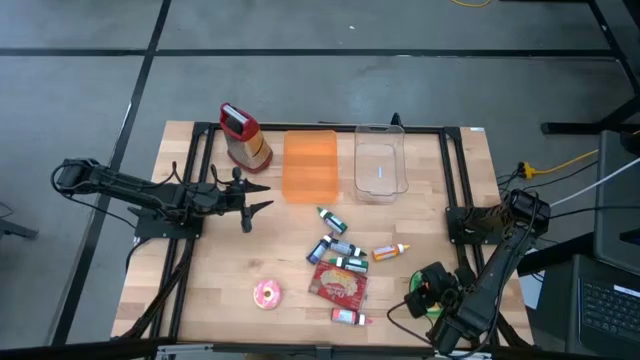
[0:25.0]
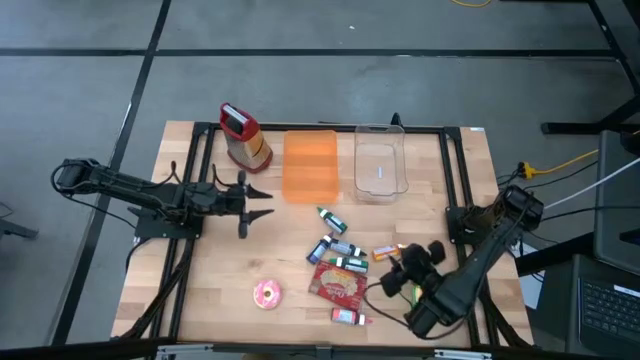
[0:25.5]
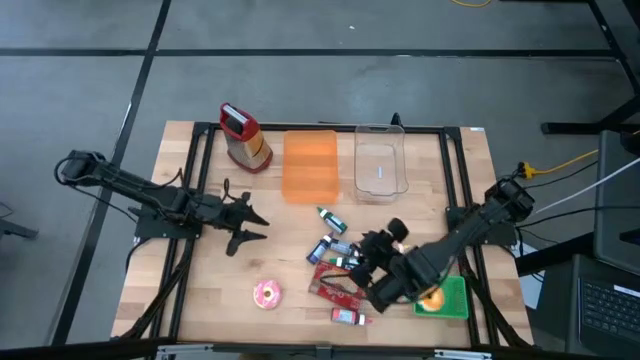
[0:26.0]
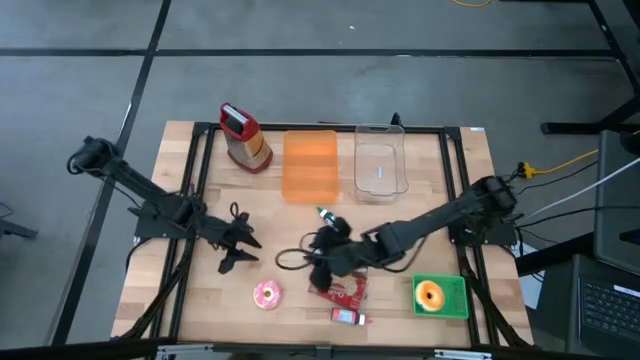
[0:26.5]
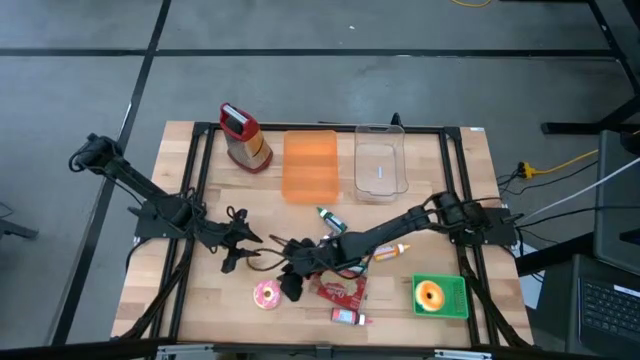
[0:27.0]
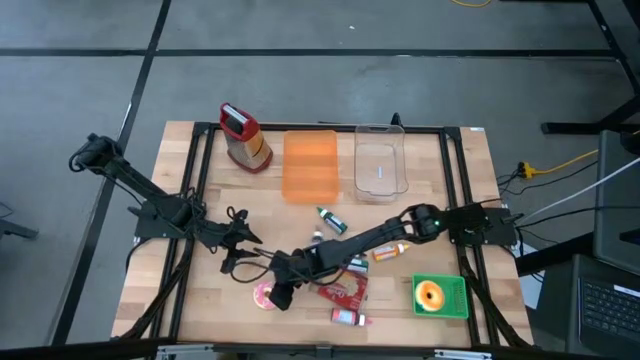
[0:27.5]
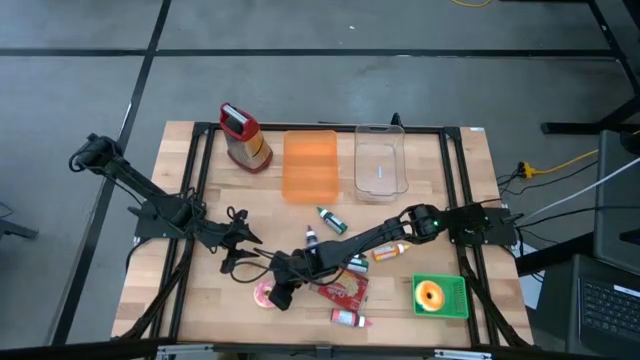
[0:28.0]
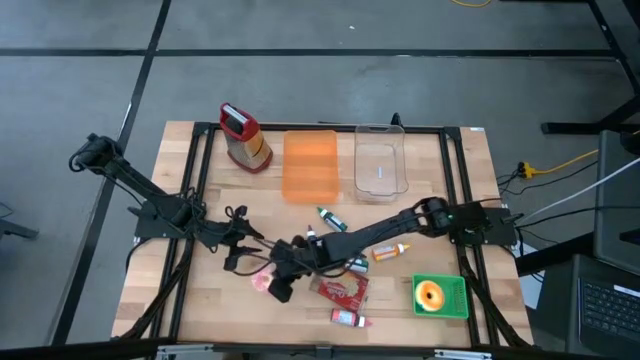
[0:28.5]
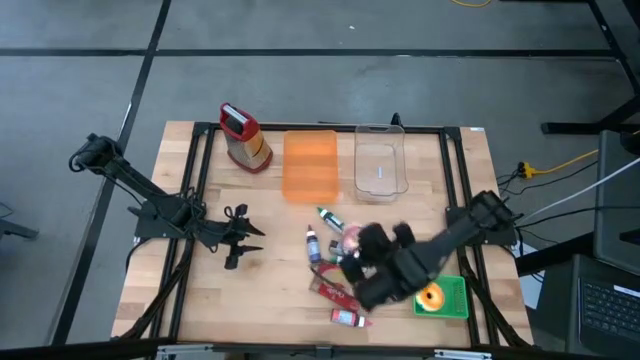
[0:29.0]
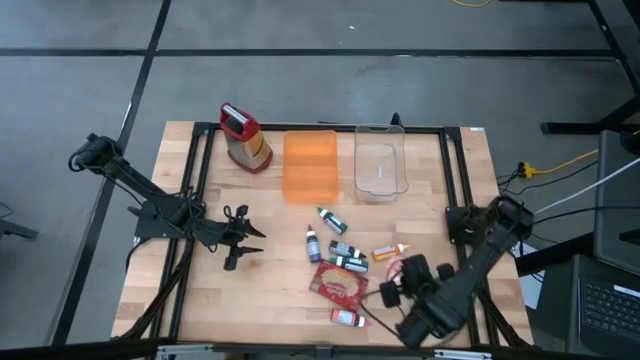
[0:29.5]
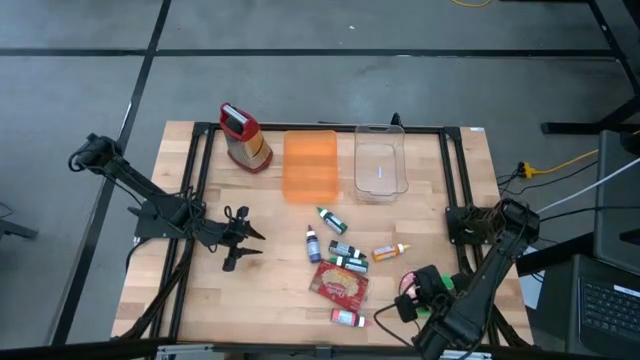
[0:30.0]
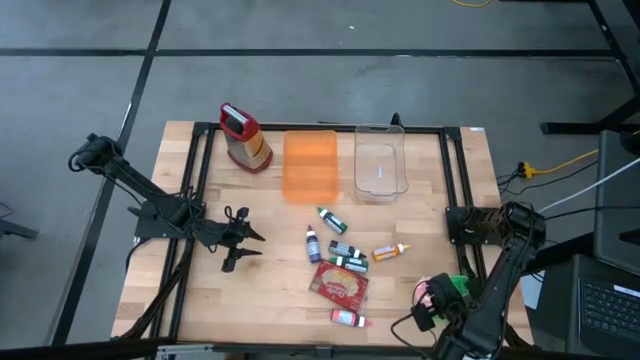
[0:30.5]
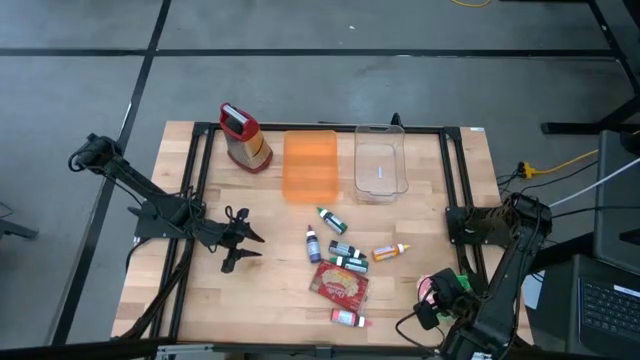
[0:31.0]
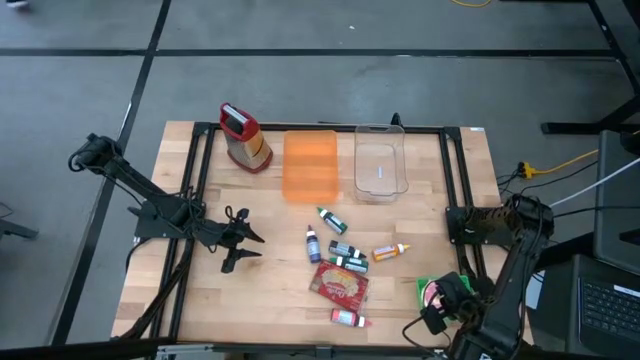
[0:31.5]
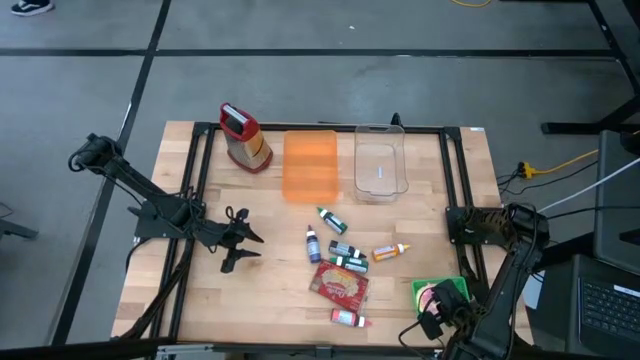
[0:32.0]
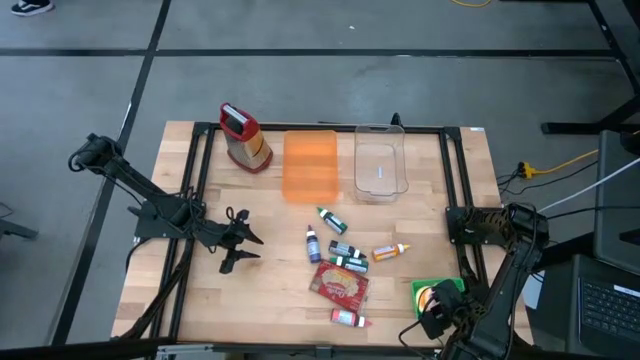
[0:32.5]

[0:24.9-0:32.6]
Put the pink doughnut into the green bin

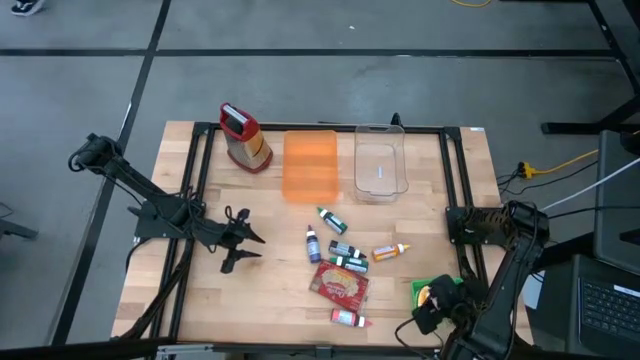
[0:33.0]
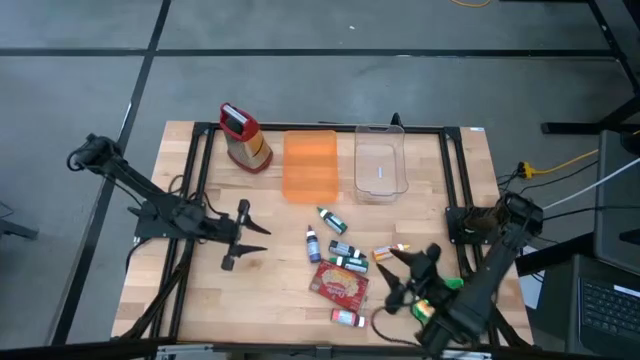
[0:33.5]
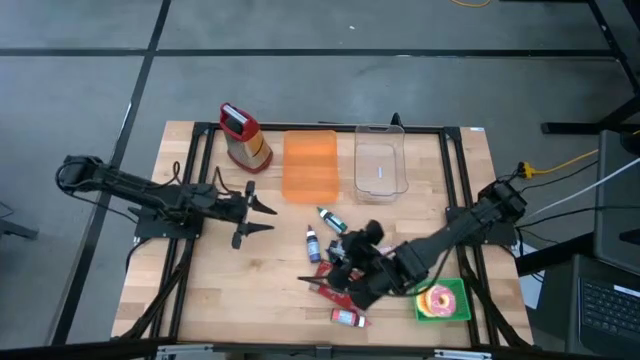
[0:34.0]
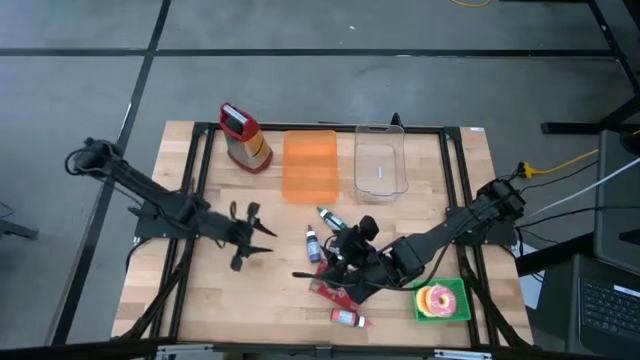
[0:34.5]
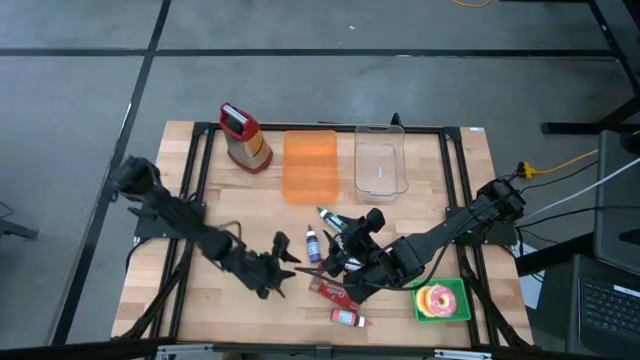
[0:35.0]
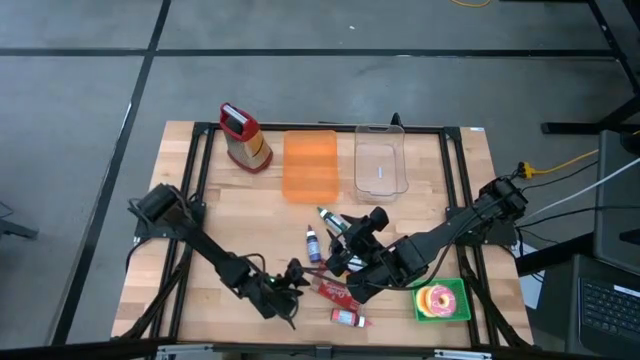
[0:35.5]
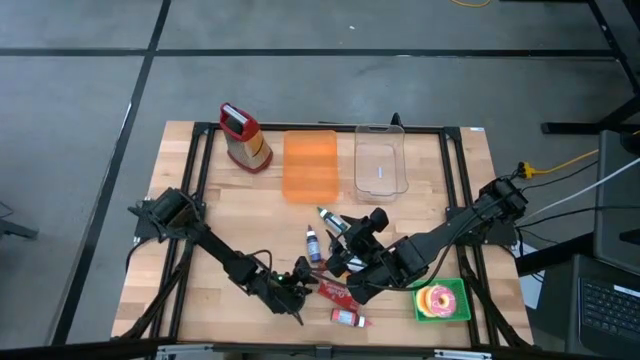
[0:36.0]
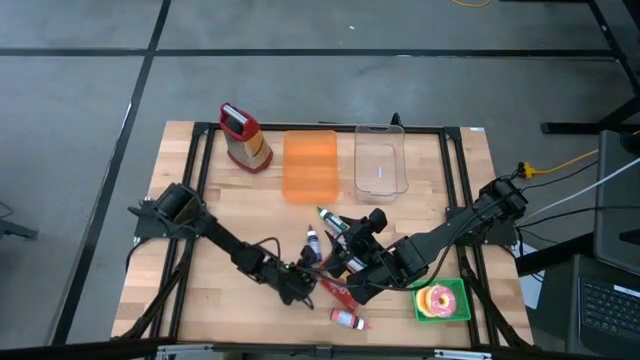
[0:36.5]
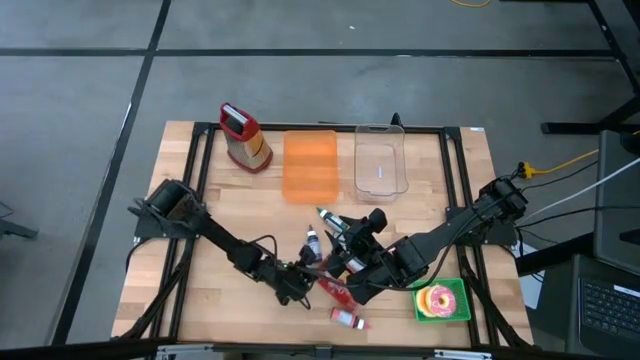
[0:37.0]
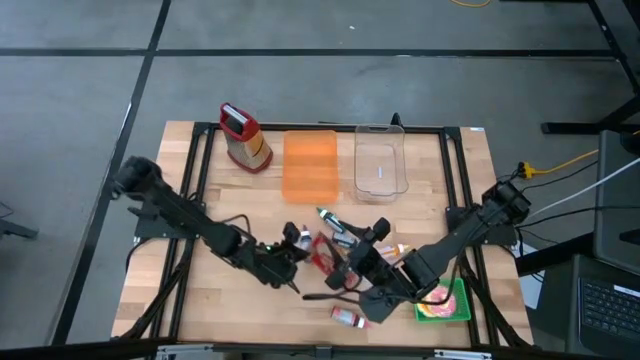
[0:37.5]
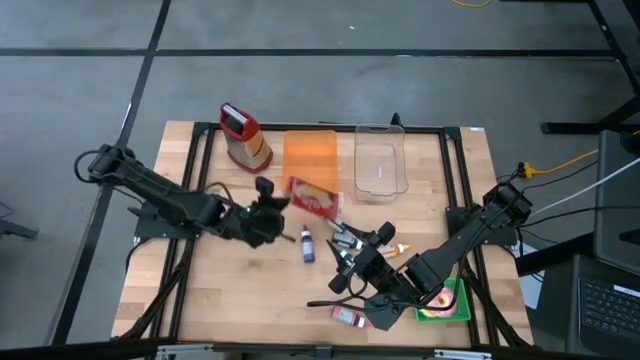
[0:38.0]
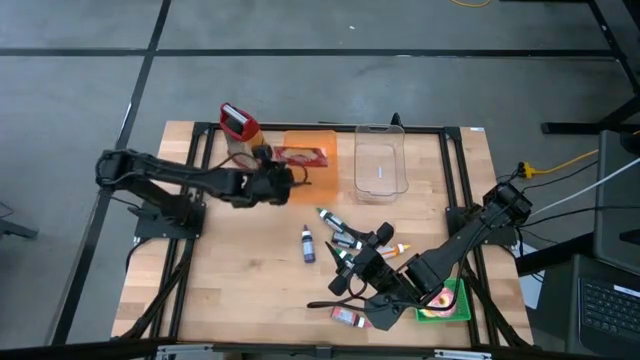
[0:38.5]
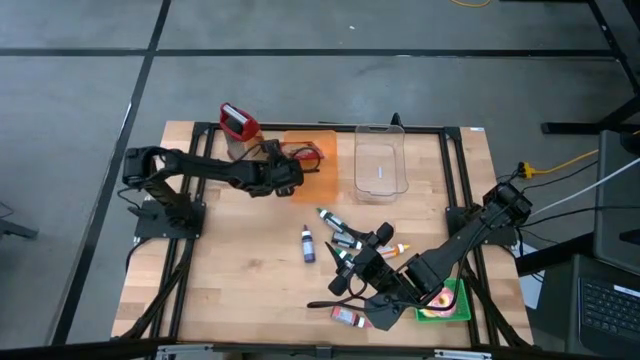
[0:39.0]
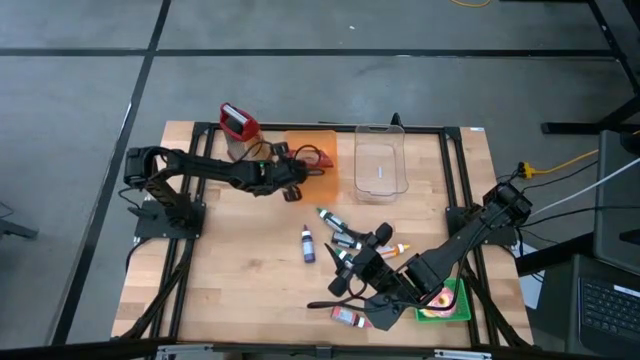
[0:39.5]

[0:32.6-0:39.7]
Put the red popcorn bag into the orange bin

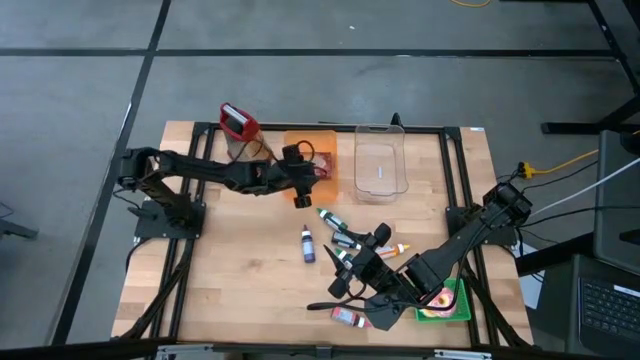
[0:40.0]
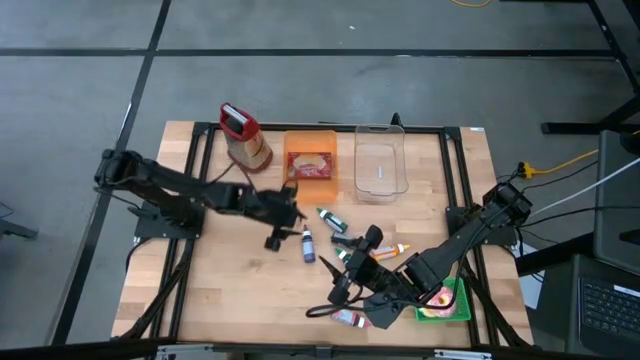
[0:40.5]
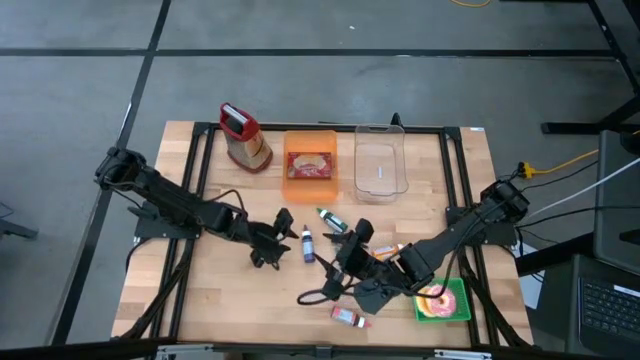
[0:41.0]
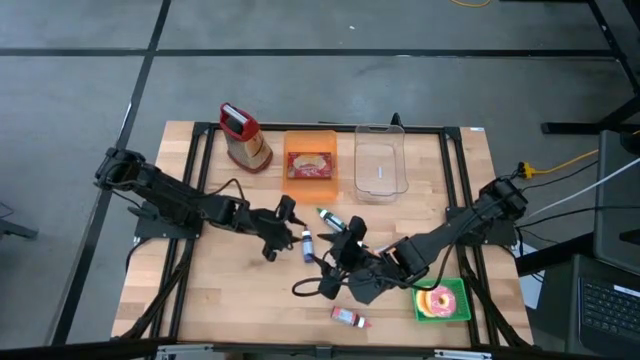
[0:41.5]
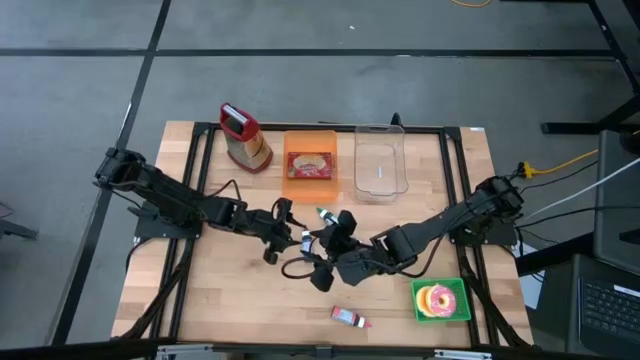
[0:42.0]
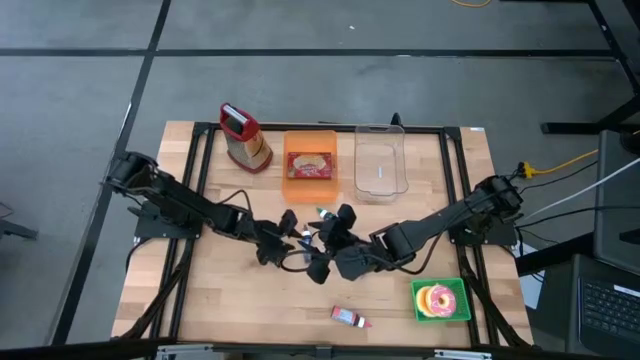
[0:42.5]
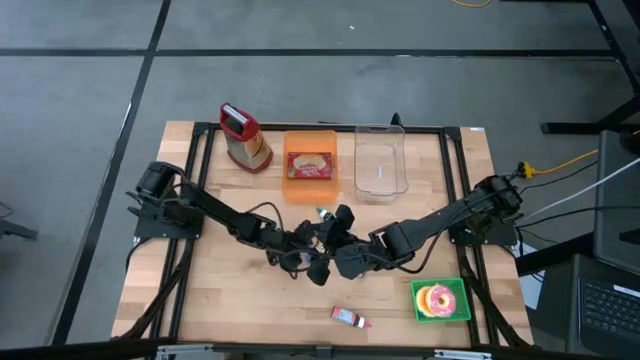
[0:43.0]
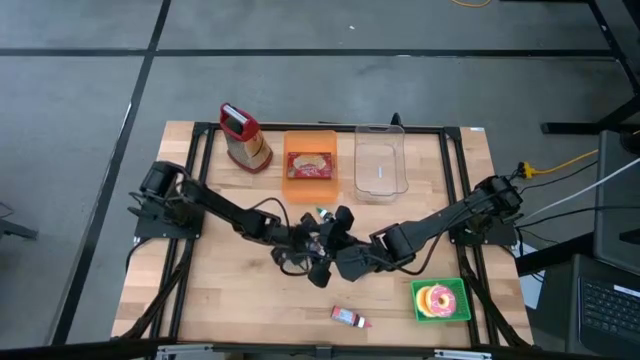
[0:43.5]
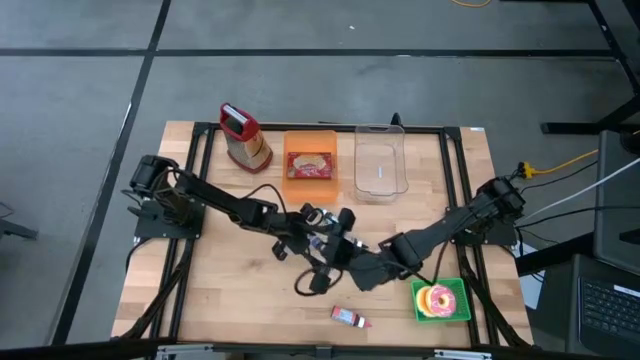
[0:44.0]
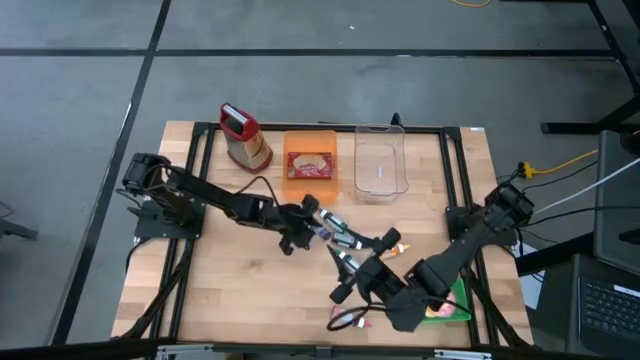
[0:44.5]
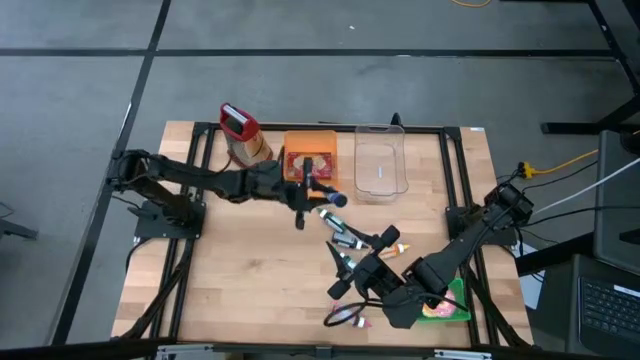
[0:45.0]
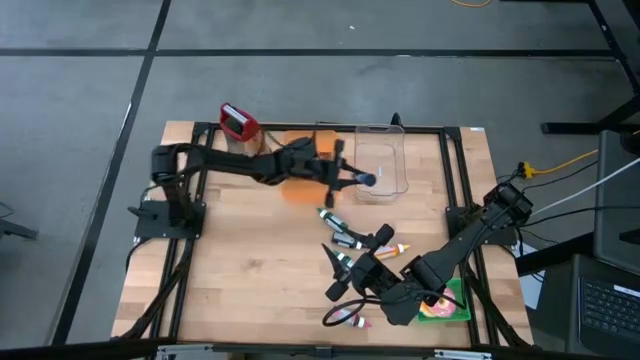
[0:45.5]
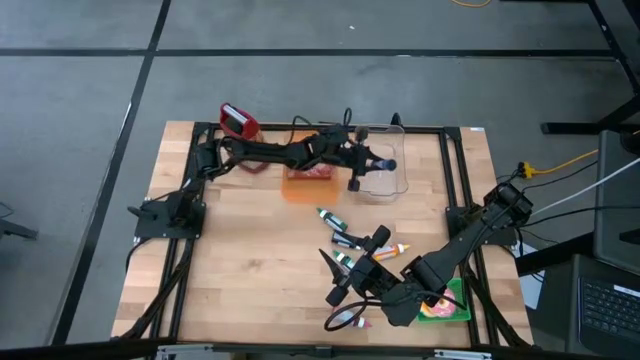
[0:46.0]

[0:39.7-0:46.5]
Put the purple food coloring into the transparent bin
